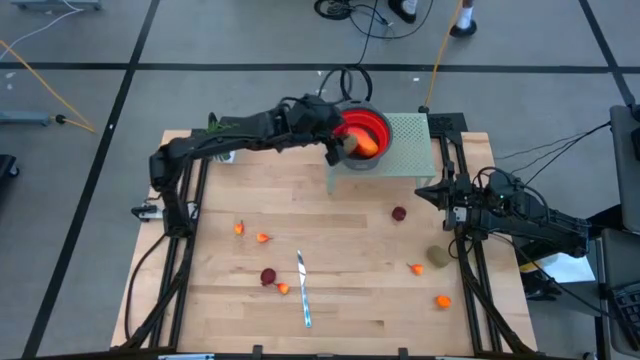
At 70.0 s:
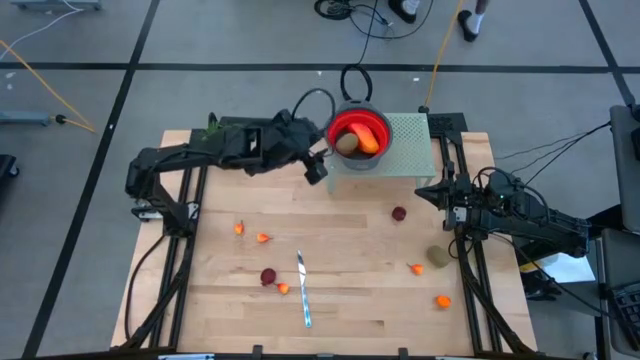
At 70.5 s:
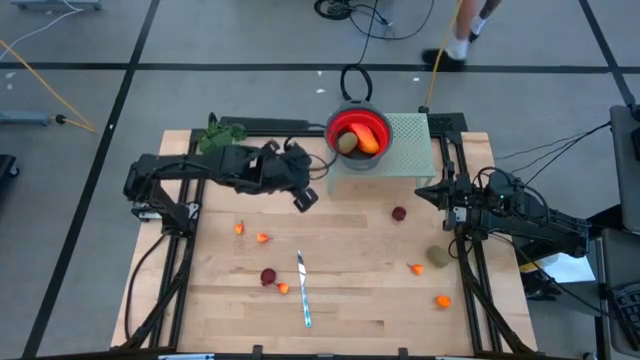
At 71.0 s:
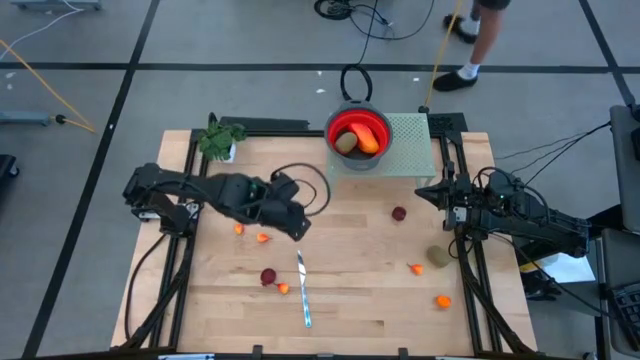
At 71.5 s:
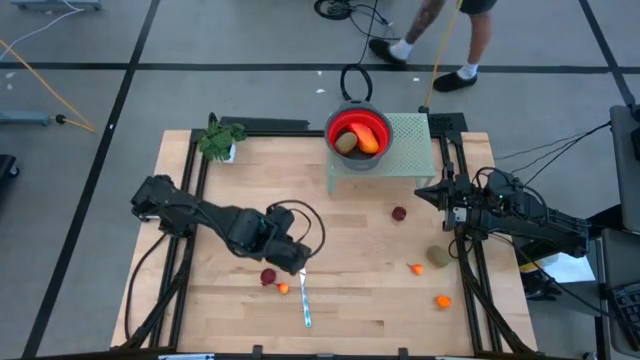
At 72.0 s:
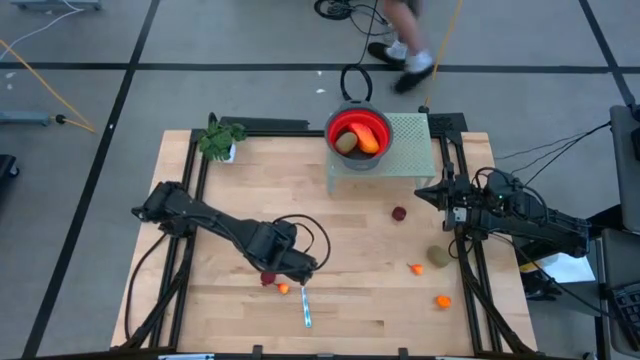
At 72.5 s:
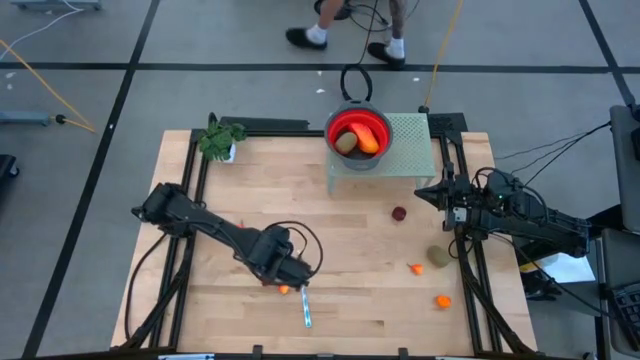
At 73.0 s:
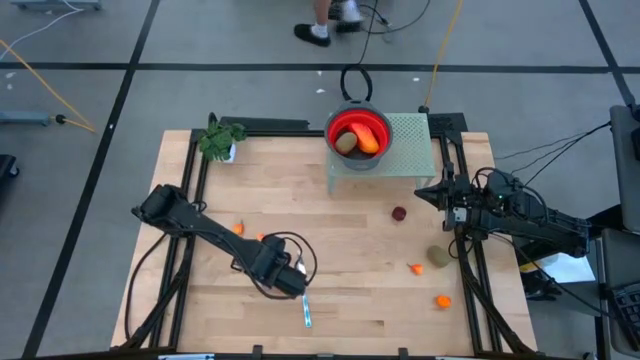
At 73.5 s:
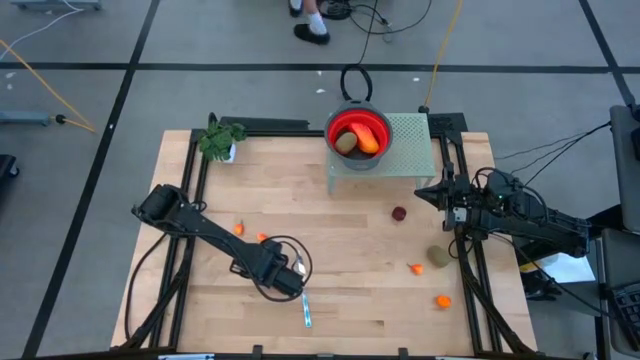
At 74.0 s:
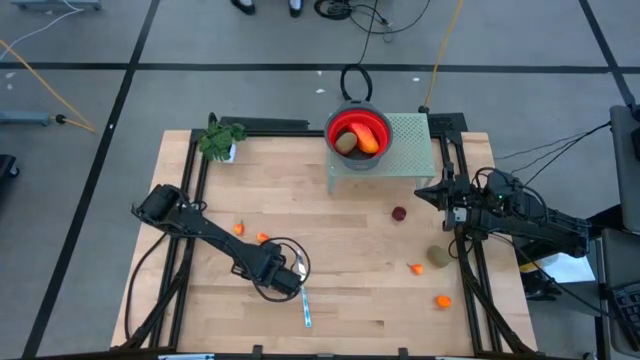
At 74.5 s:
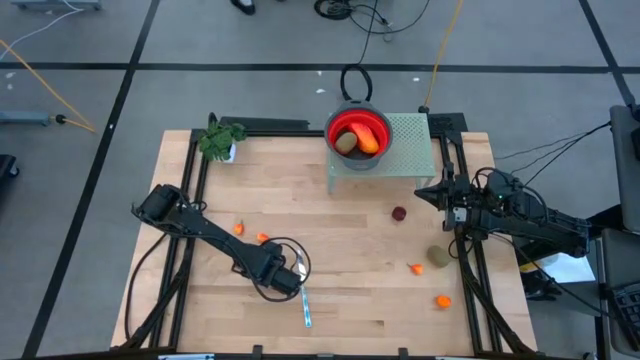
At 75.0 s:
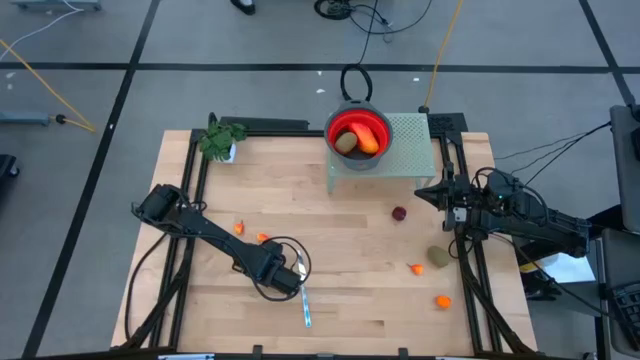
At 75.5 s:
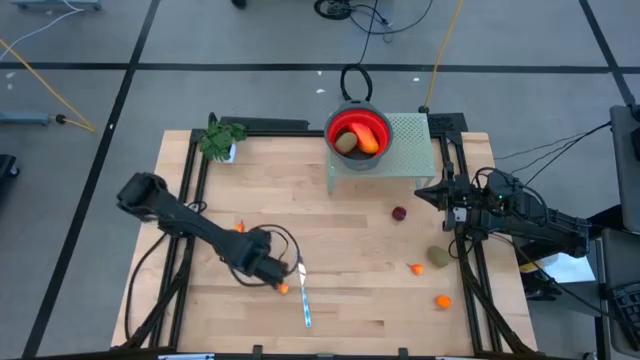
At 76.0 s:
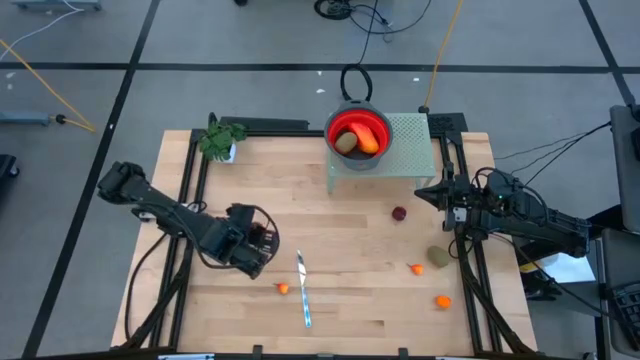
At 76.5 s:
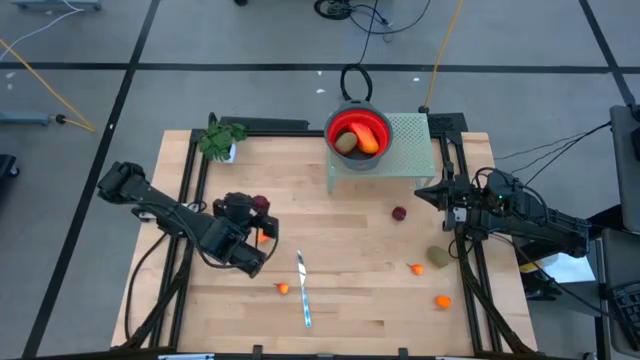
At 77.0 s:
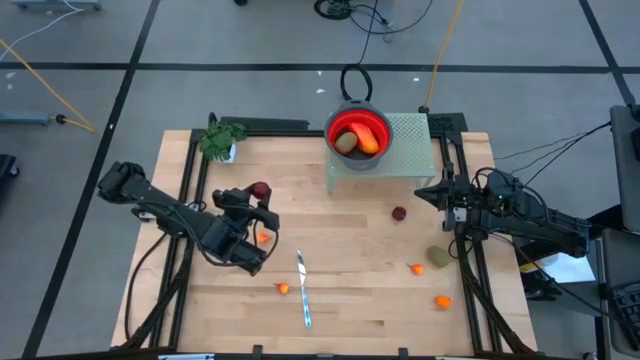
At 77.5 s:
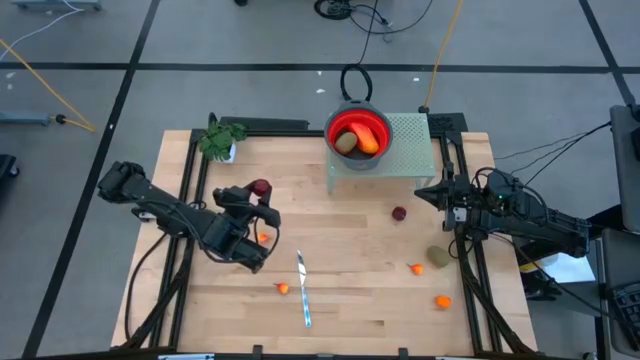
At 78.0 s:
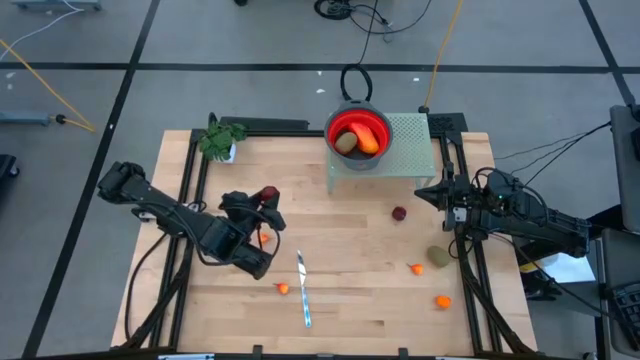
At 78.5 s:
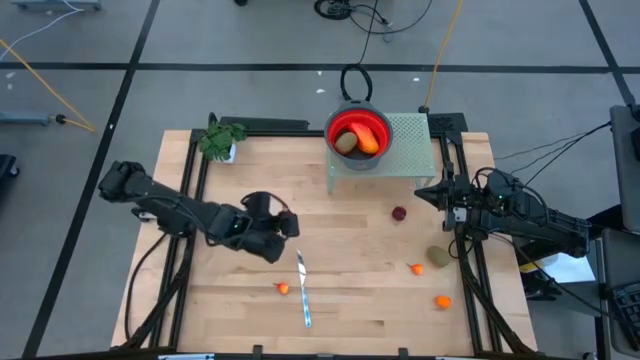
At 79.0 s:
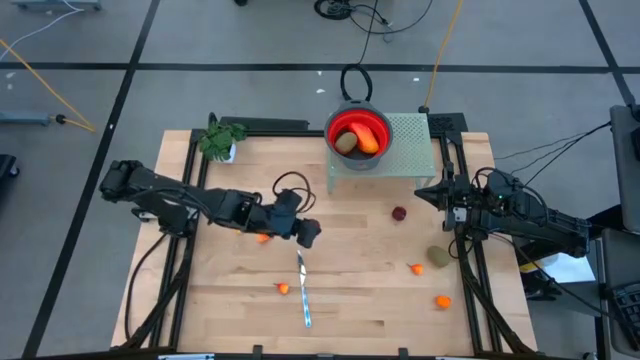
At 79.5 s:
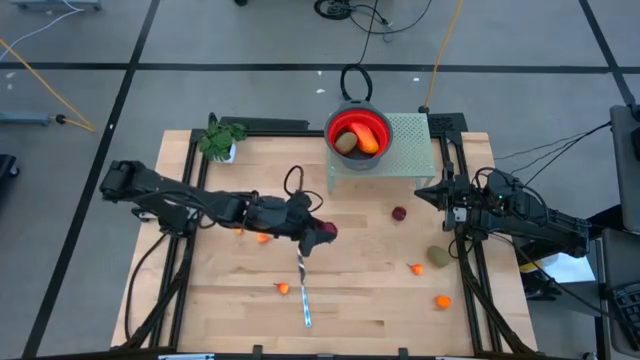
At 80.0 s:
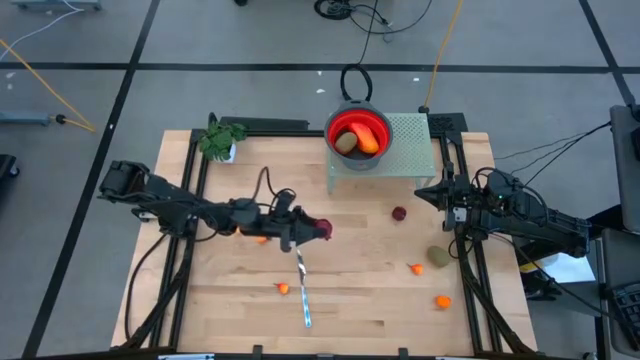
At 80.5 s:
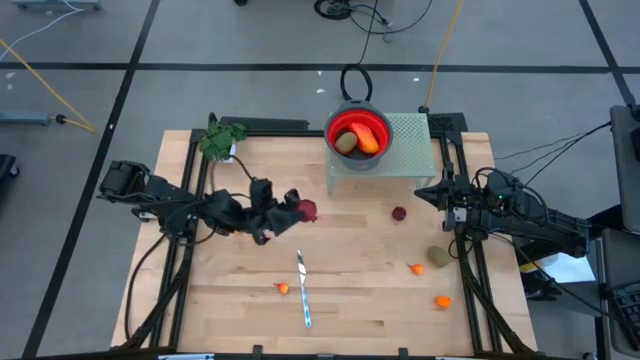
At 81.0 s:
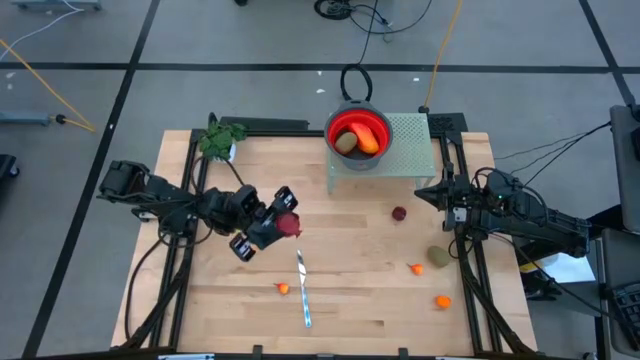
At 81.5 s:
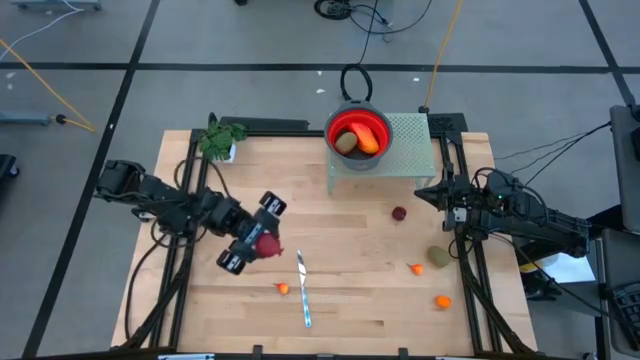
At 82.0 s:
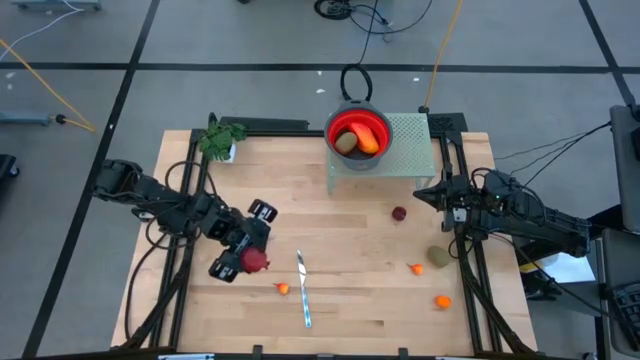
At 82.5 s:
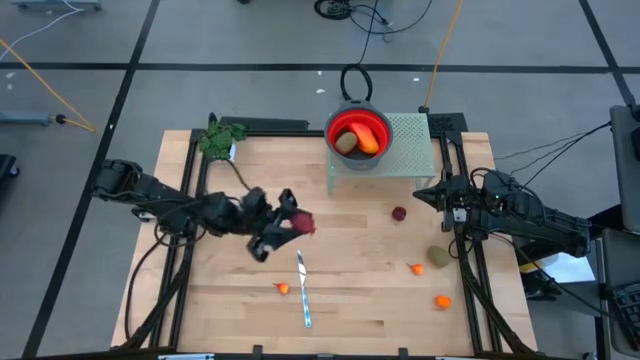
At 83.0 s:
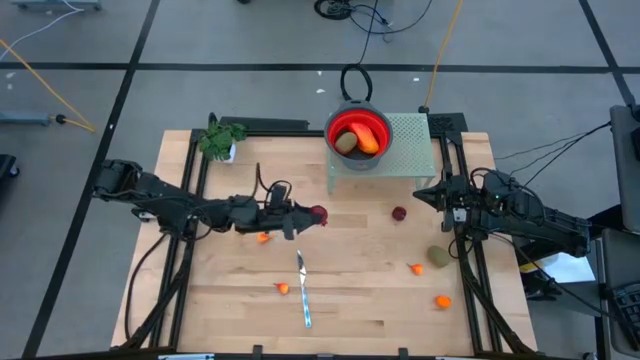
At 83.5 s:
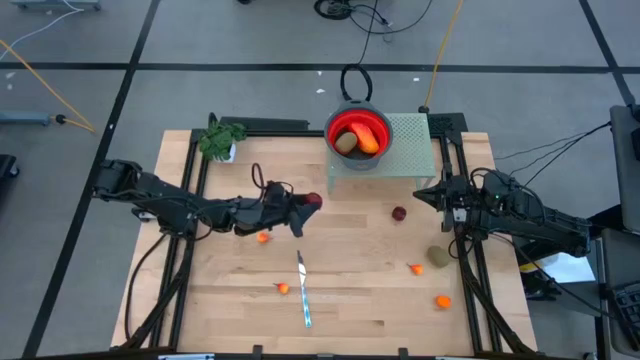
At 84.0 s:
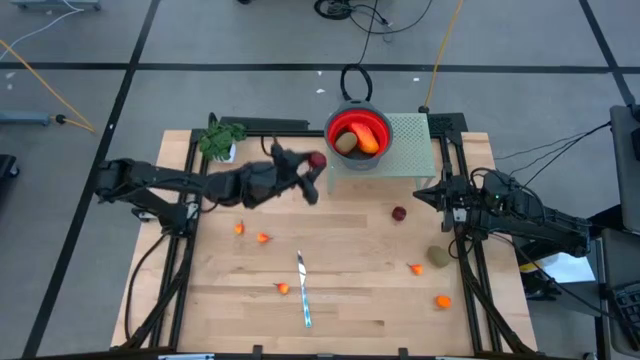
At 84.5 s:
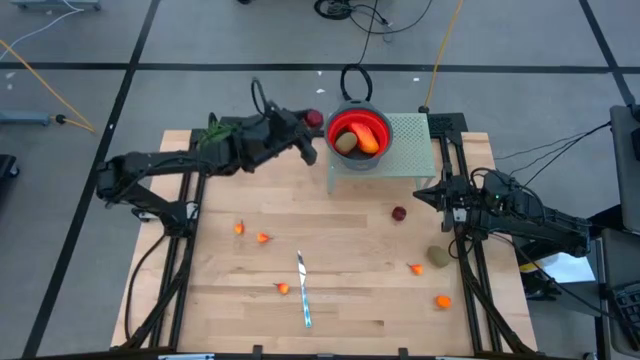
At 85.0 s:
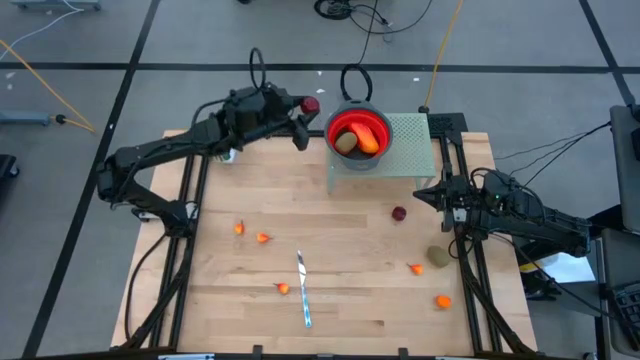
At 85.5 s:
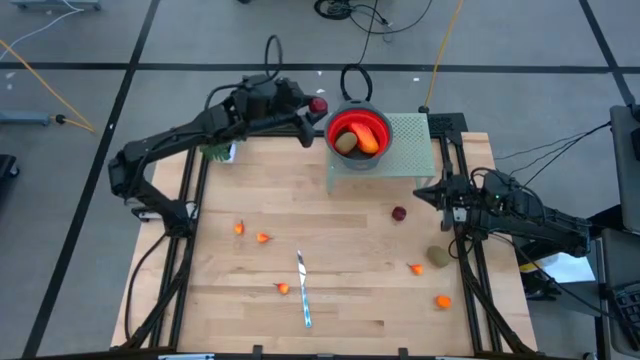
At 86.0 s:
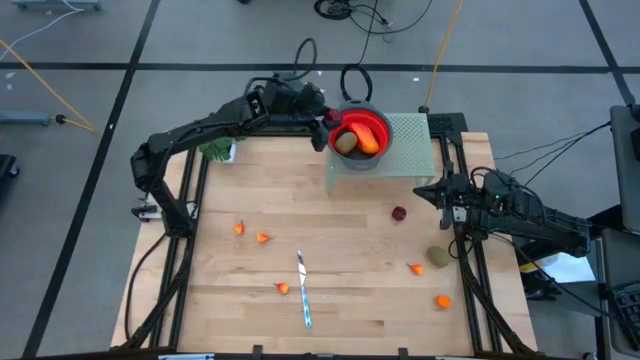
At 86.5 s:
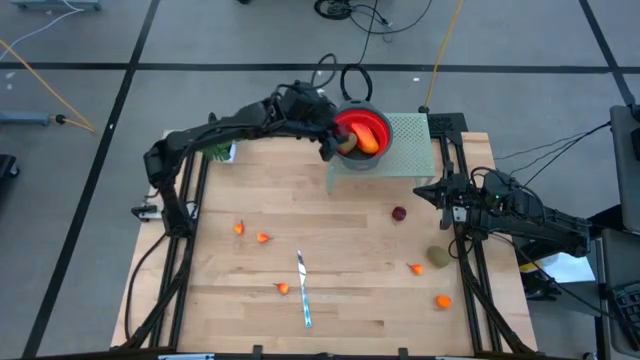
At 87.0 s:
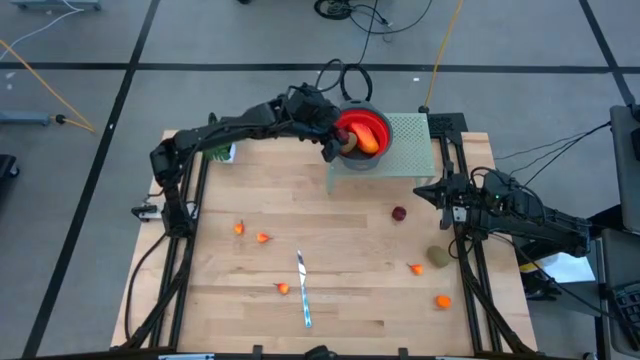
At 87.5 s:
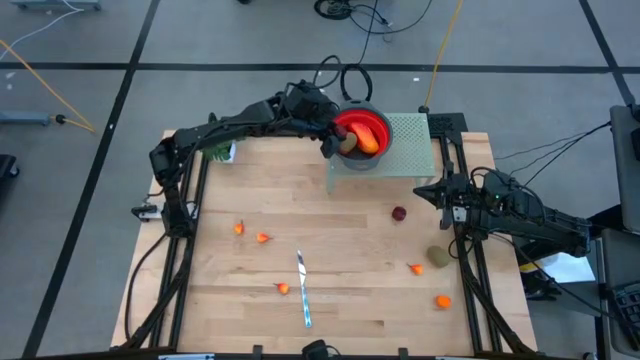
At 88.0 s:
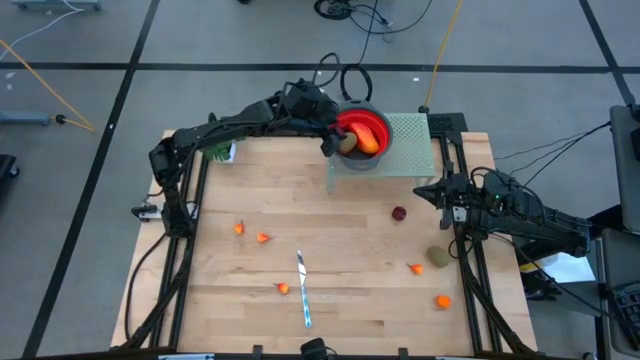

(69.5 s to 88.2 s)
Task: Pick & Place Fruit
Put the pomegranate into the red strainer bowl on the shelf

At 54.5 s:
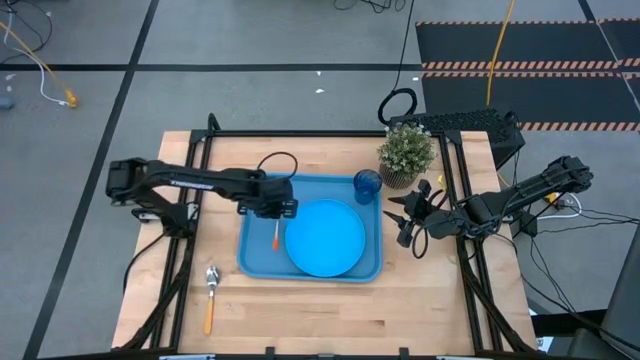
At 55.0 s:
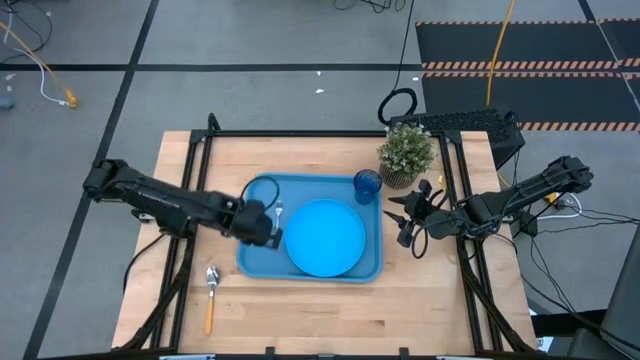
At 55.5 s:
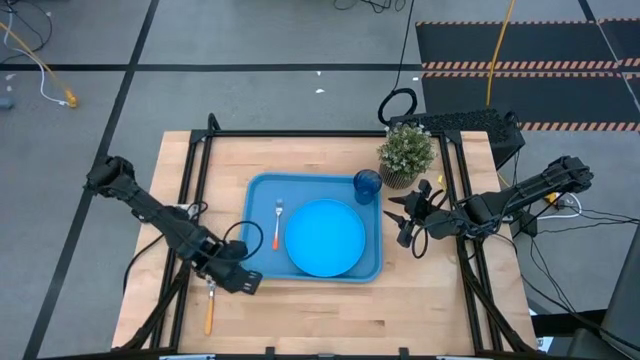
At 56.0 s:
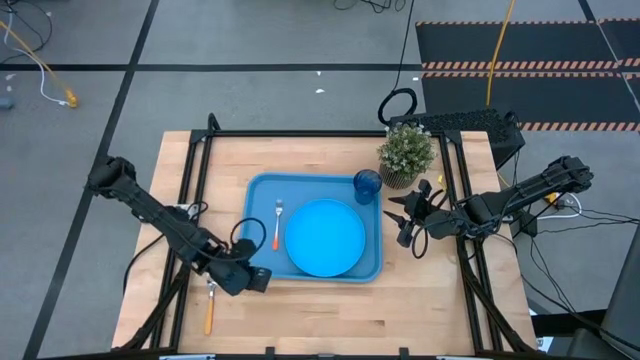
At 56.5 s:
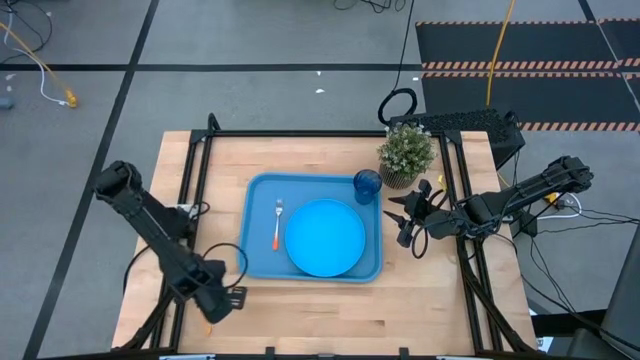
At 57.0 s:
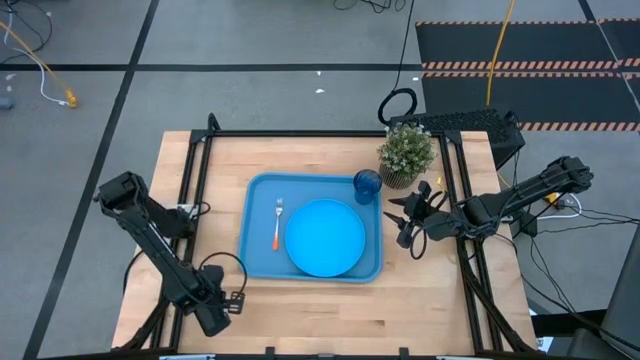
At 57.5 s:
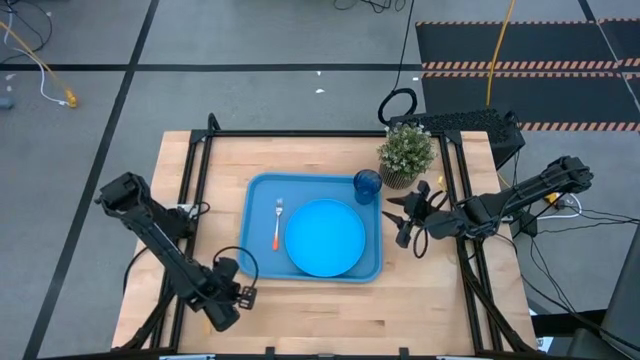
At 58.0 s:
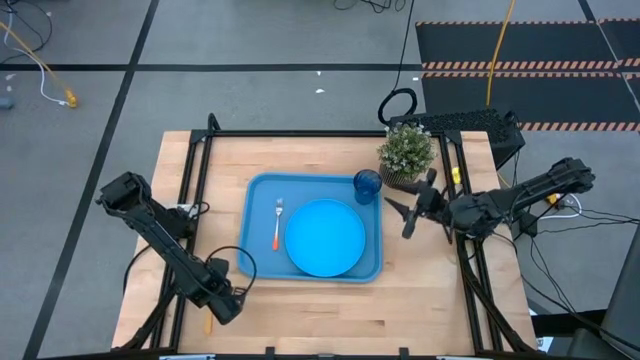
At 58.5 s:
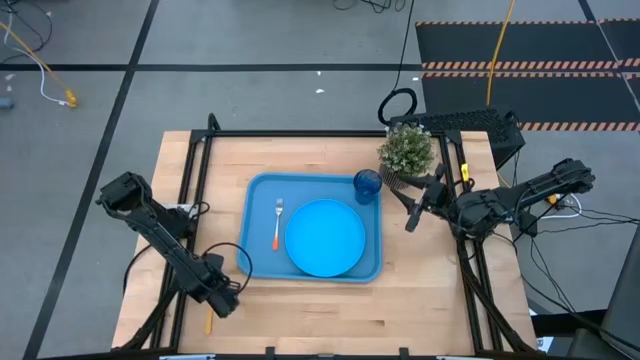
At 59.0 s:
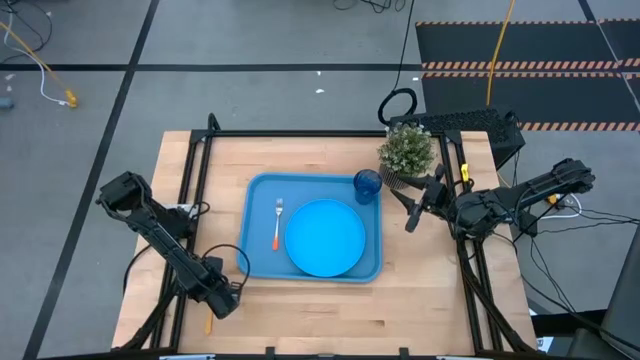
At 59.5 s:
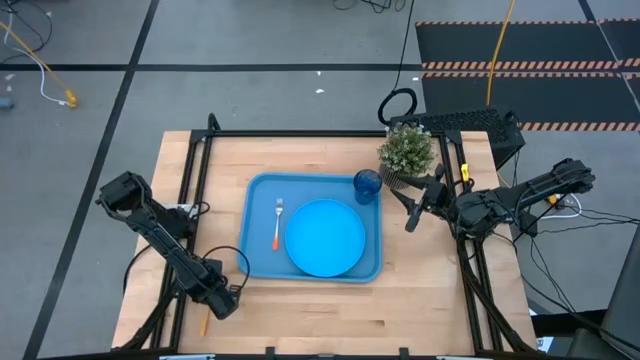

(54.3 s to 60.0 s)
Task: Pick and place plate/cup/fork/spoon on tray
Put the yellow spoon on the blue tray to the left of the orange fork
